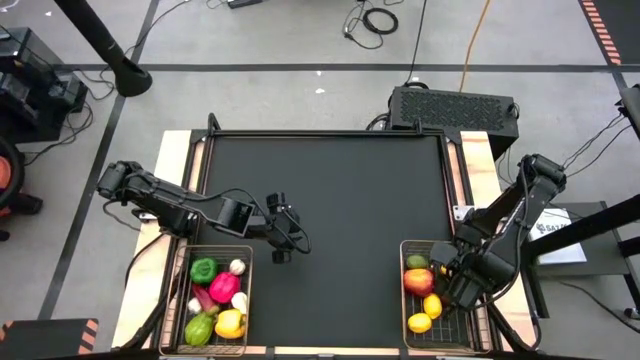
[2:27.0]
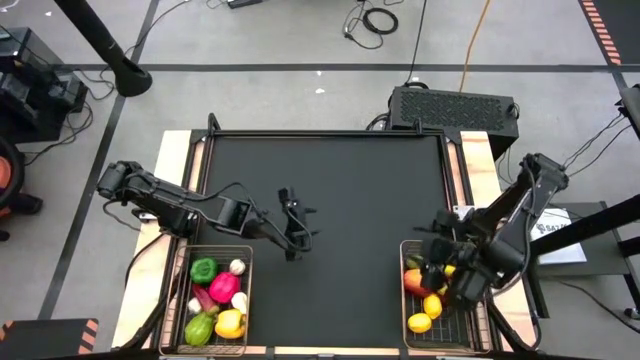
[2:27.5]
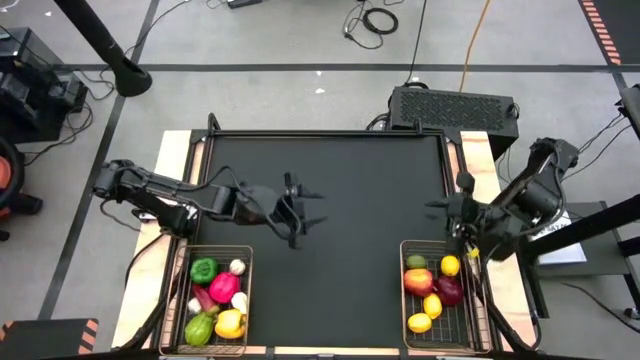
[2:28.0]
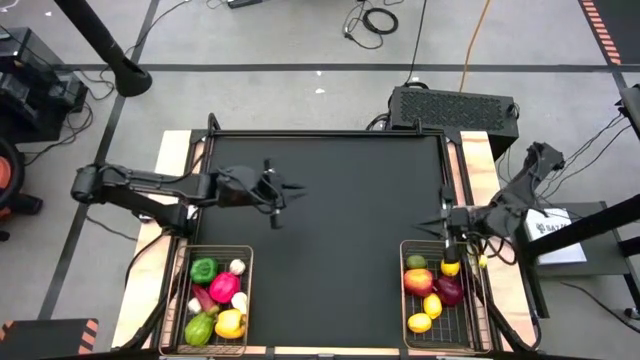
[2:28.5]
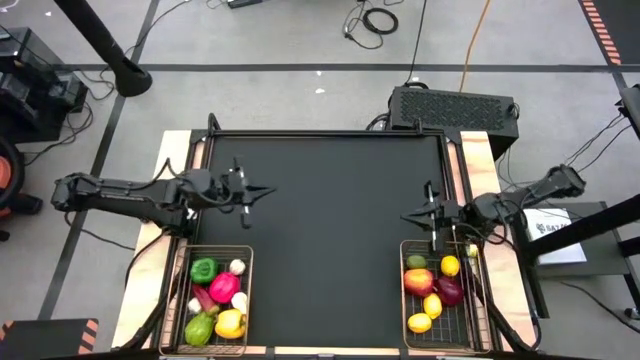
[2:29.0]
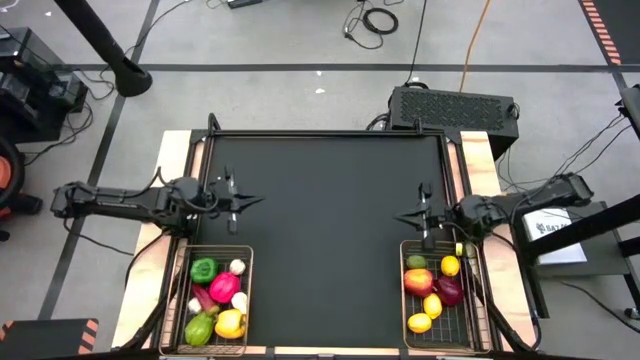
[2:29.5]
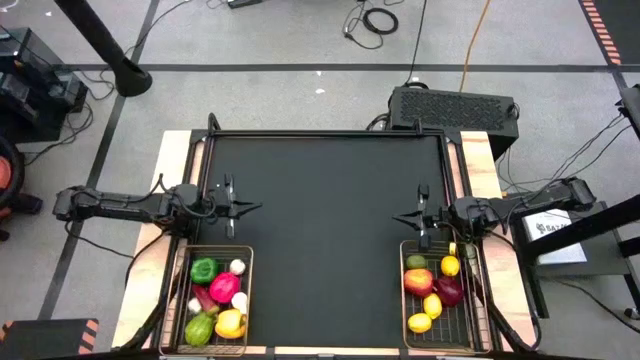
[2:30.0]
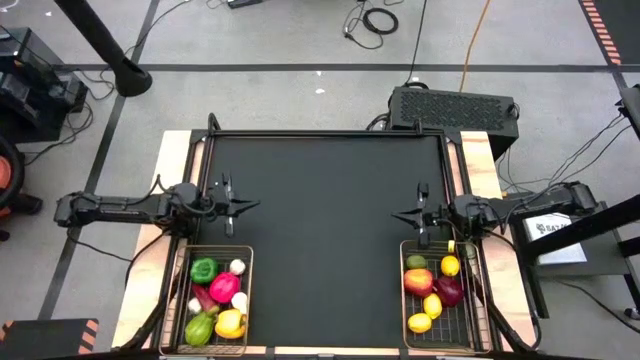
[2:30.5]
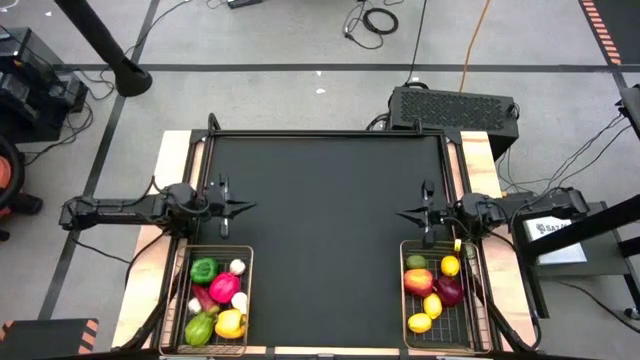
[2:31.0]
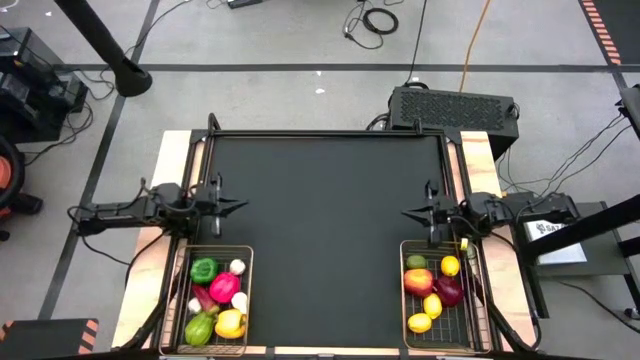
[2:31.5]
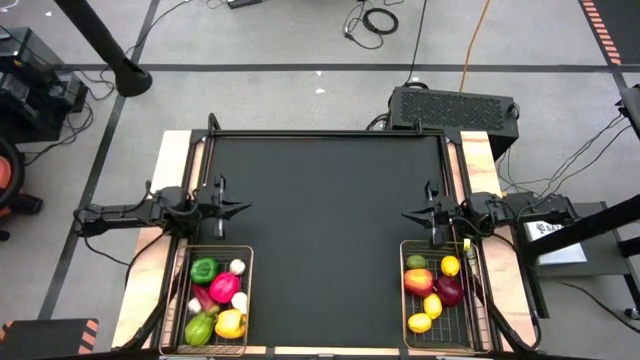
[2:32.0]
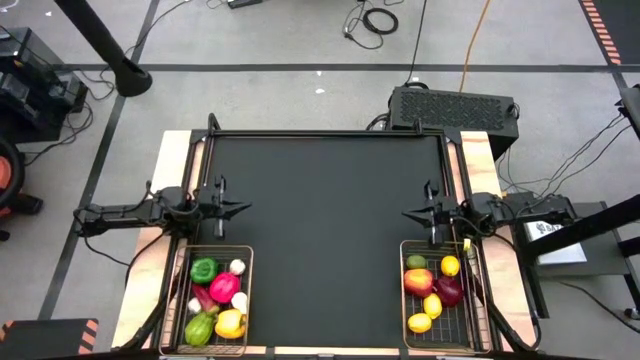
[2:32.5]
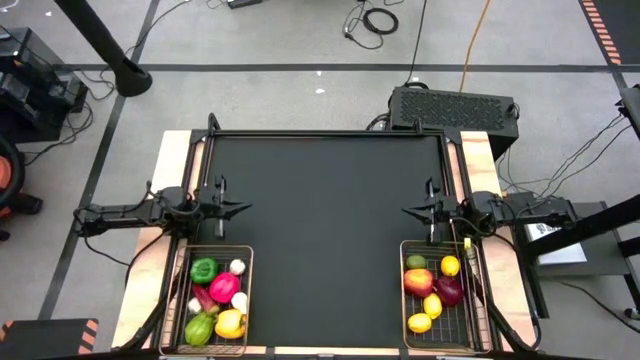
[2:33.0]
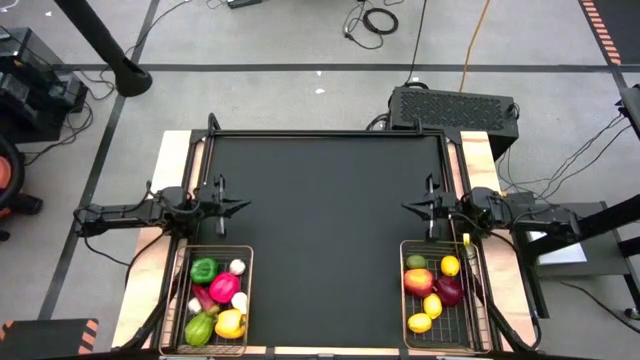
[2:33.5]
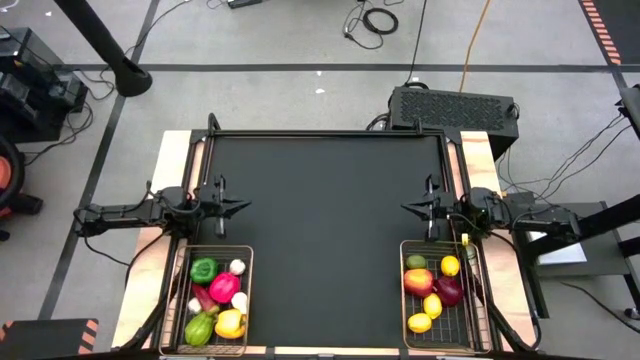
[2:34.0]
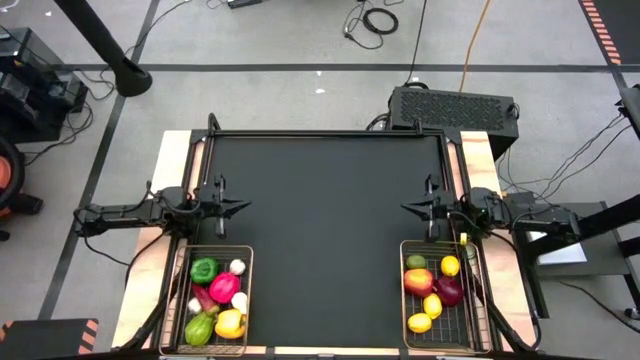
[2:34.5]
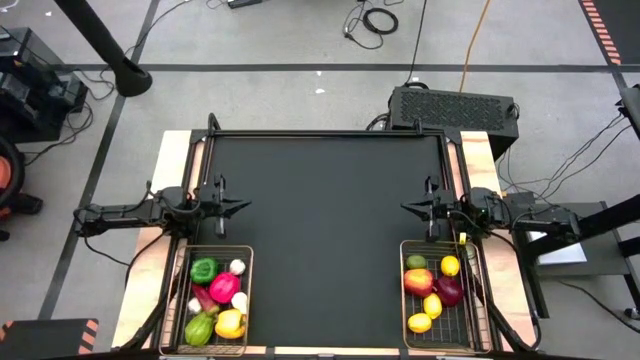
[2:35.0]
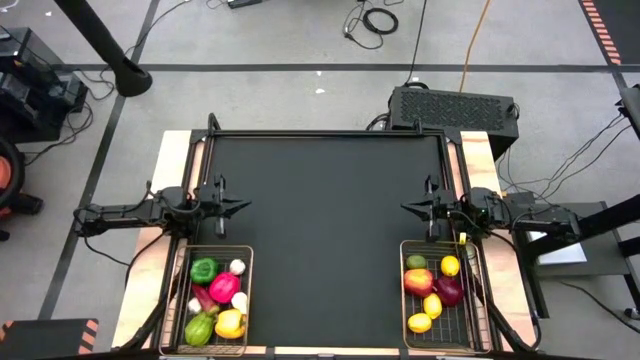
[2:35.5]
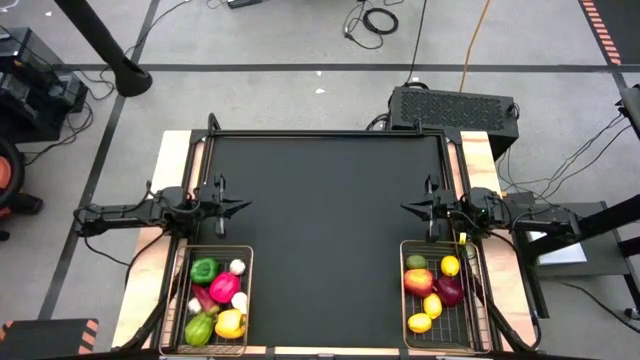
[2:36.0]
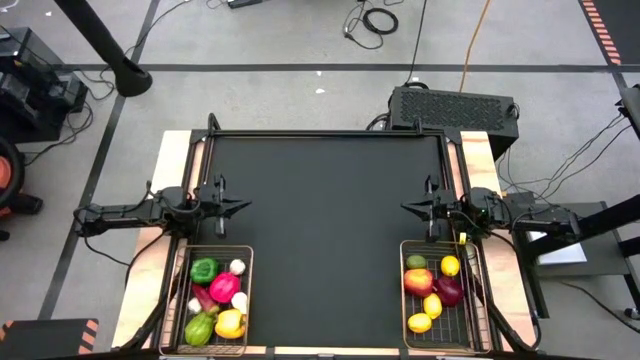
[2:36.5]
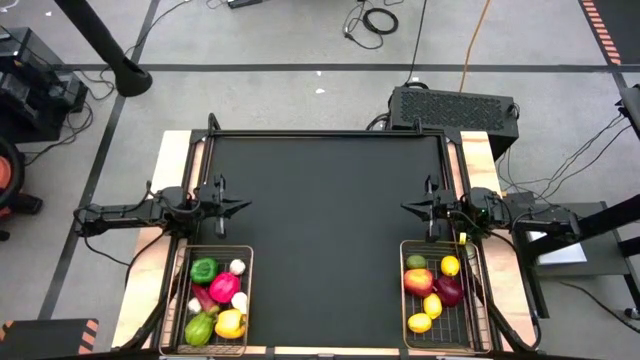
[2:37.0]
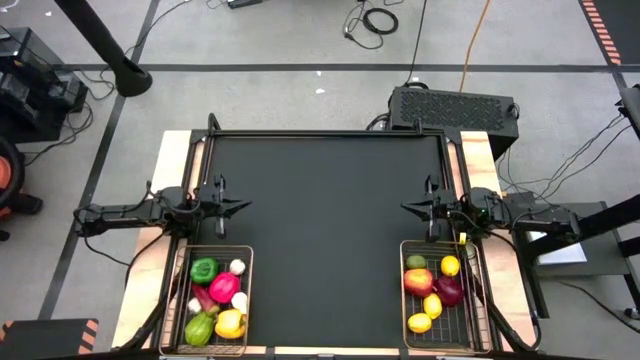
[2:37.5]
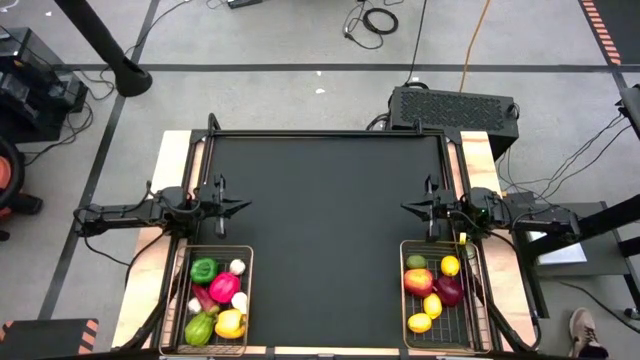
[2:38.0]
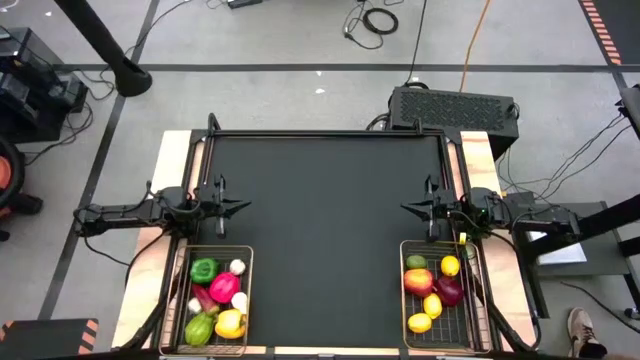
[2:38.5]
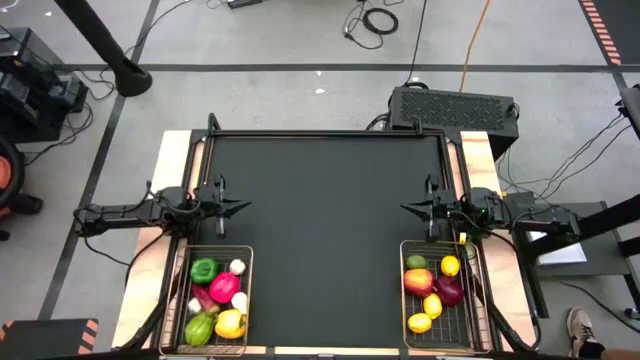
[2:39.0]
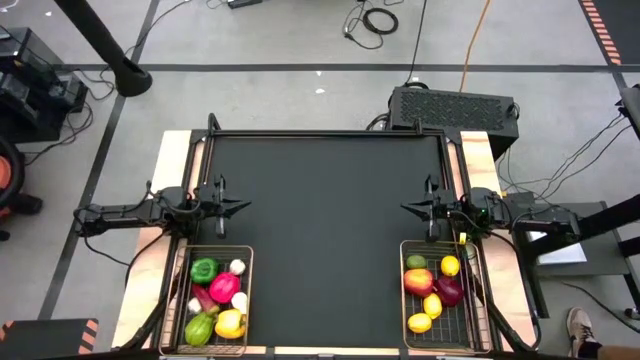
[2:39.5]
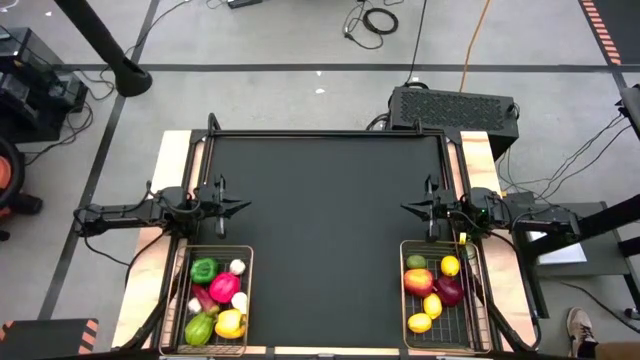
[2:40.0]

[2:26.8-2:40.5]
Task: Sort produce into baskets
Return to Home Position

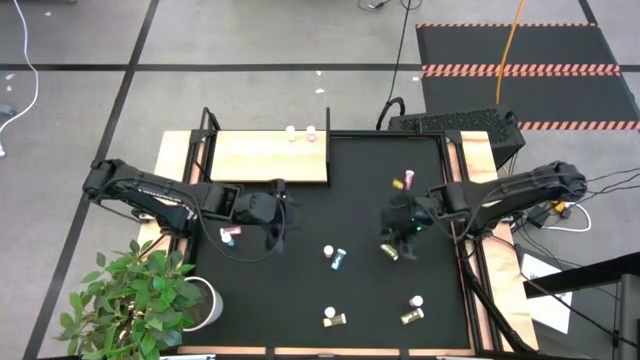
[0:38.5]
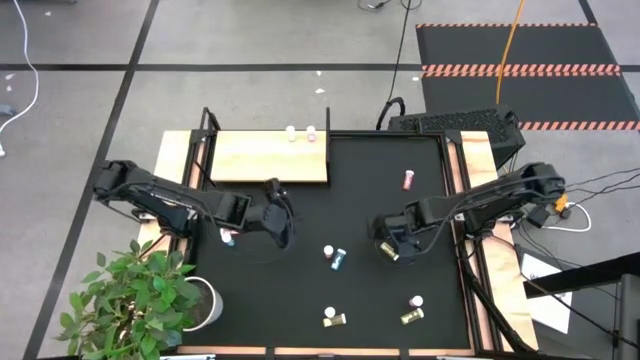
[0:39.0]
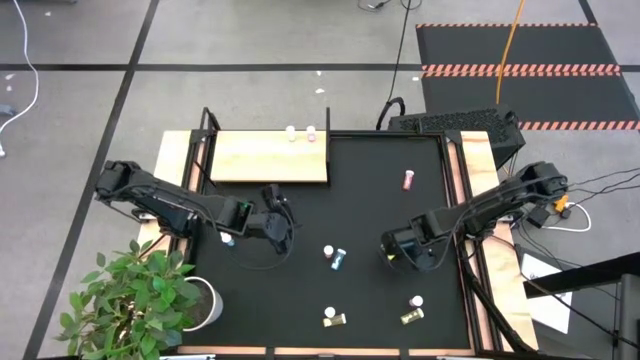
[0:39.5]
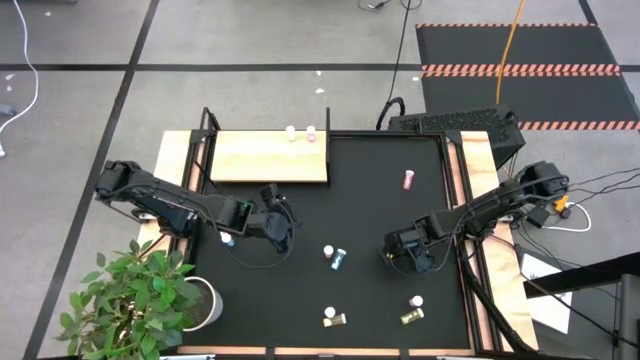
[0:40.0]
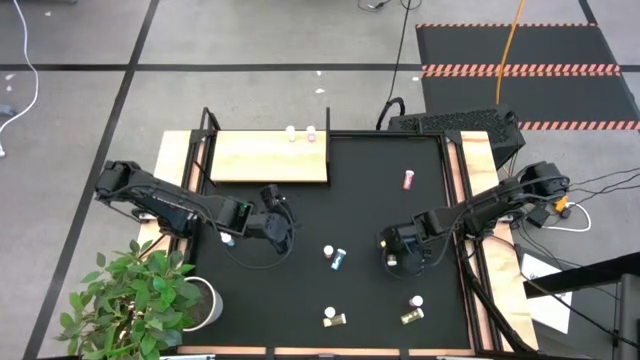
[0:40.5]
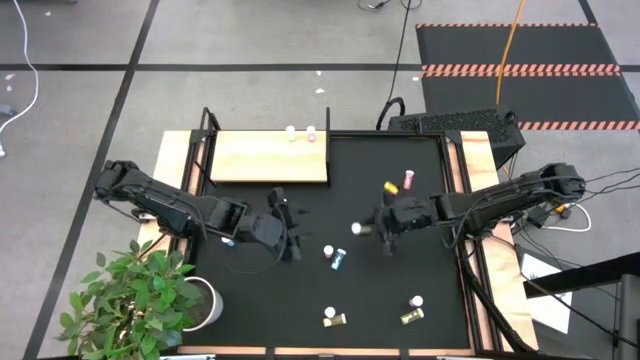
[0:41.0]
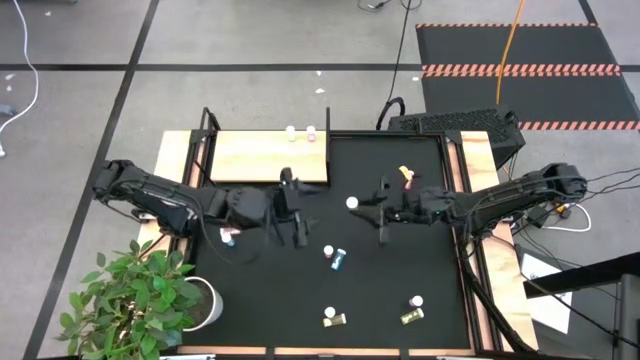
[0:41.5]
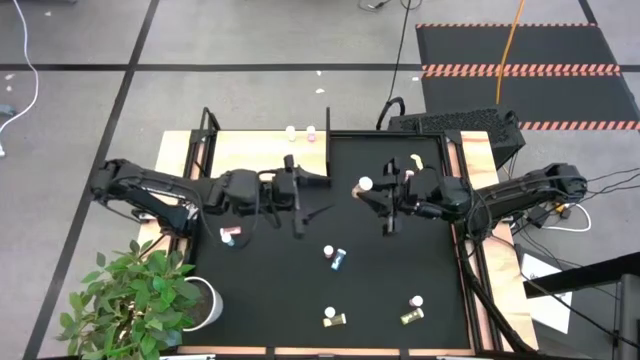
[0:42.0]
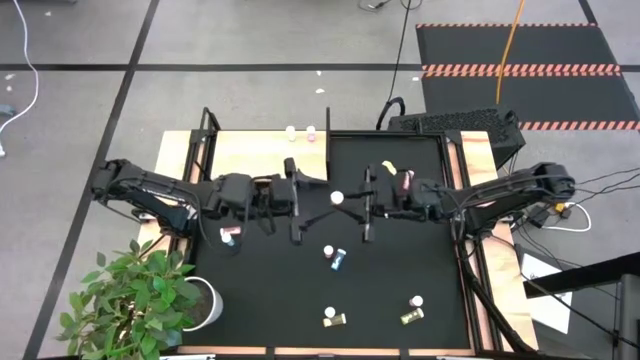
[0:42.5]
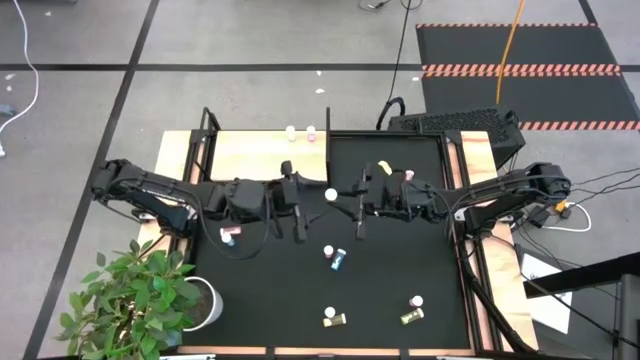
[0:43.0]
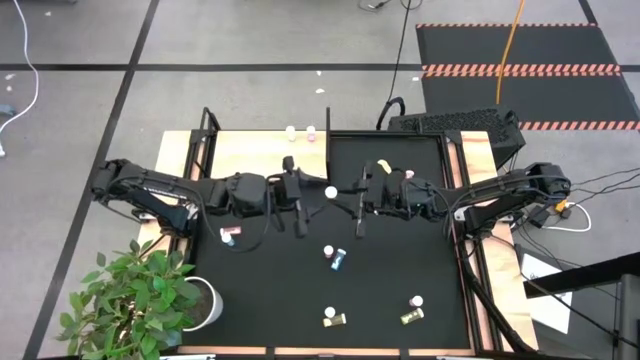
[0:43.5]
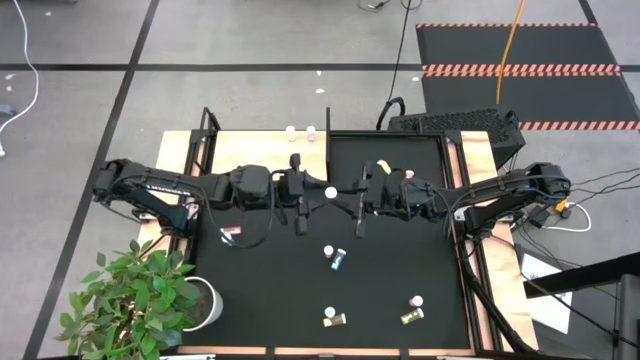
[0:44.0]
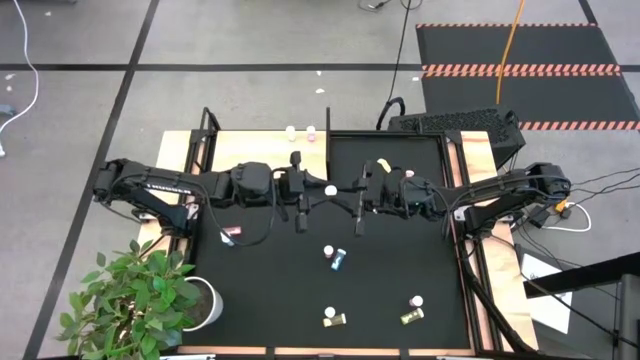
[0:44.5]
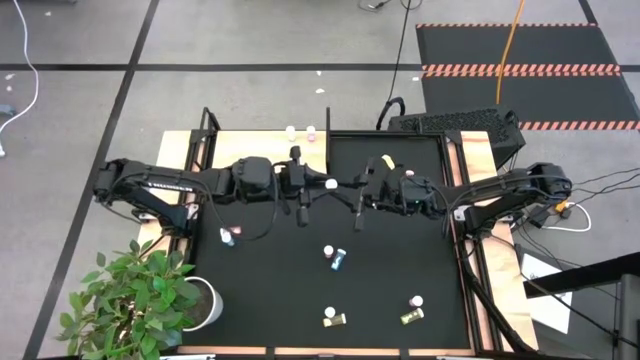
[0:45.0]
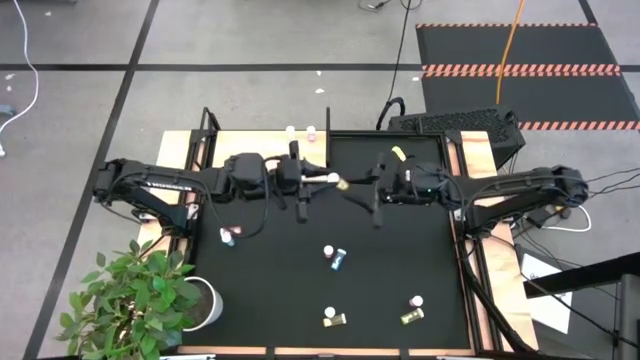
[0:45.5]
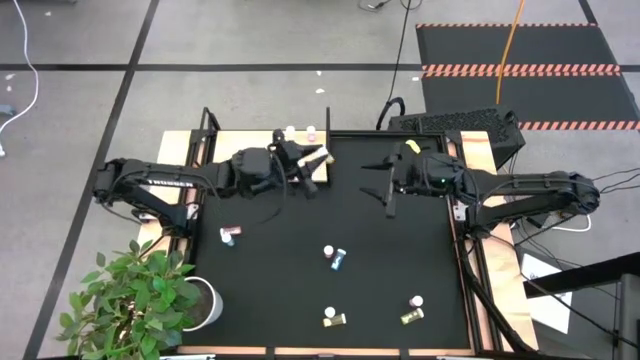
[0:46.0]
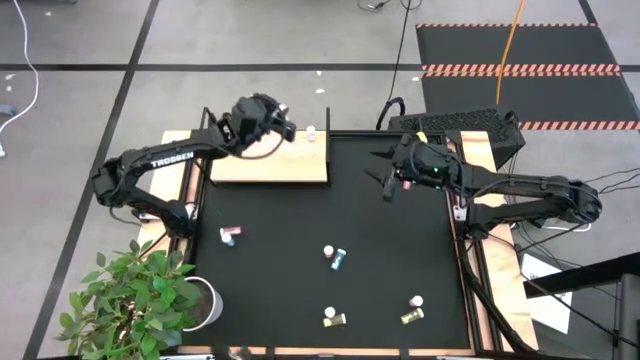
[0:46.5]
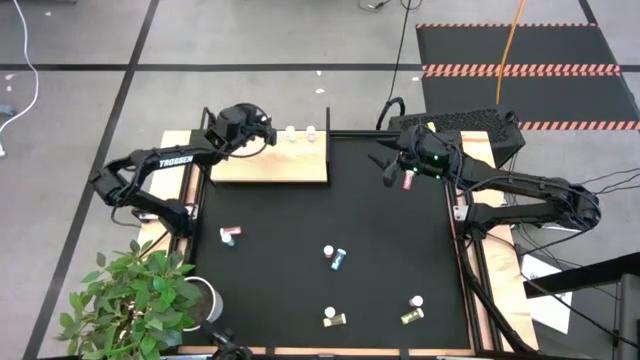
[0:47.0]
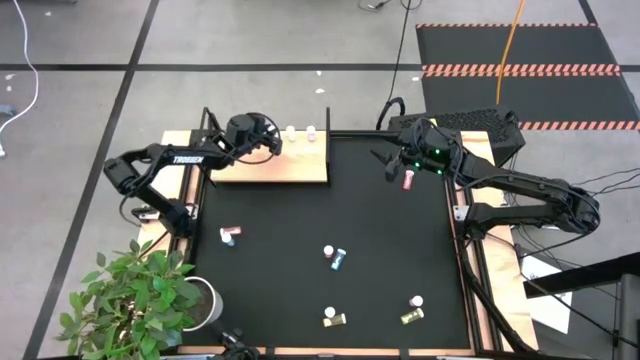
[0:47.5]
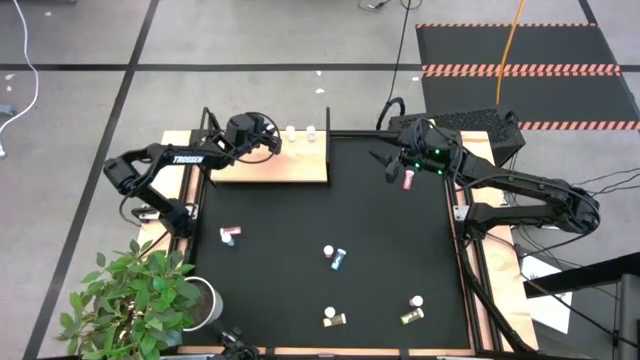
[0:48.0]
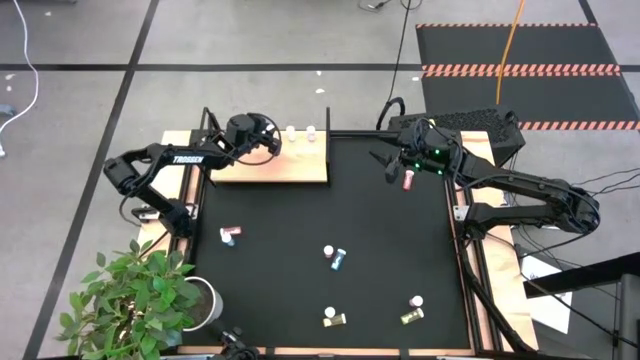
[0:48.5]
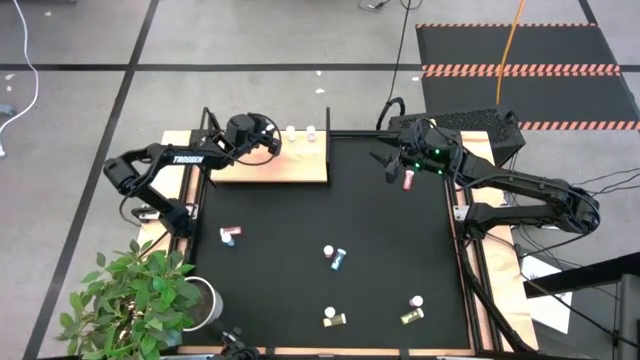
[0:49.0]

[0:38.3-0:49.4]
Task: Pick and place medicine bottles onto shelf by color
Put the top right yellow pill bottle on the shelf
